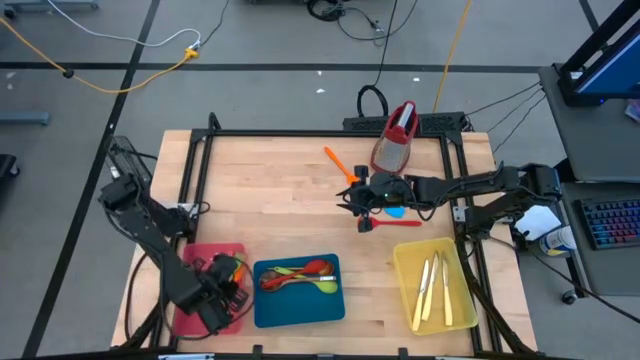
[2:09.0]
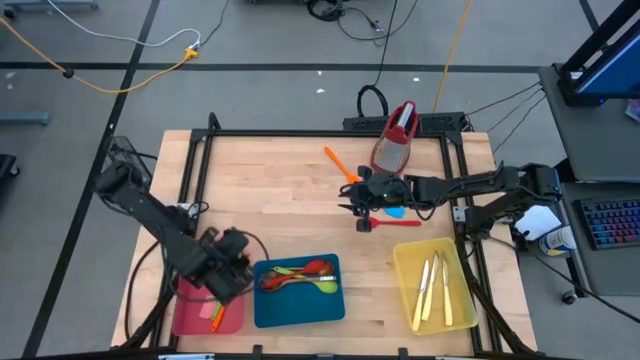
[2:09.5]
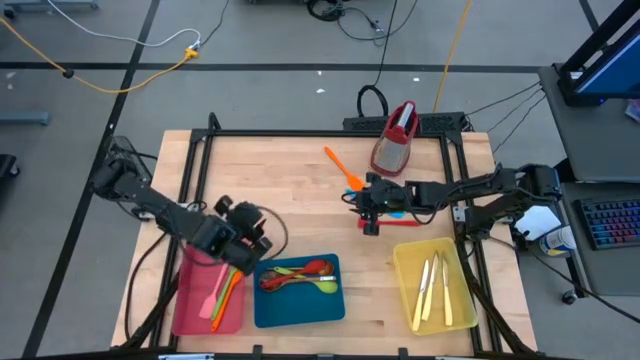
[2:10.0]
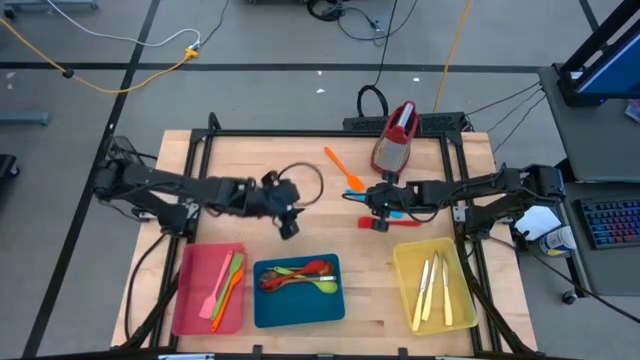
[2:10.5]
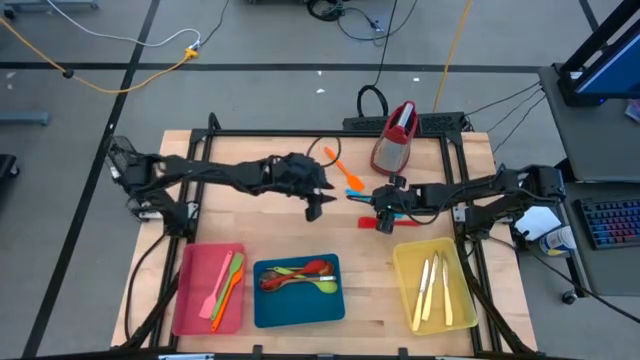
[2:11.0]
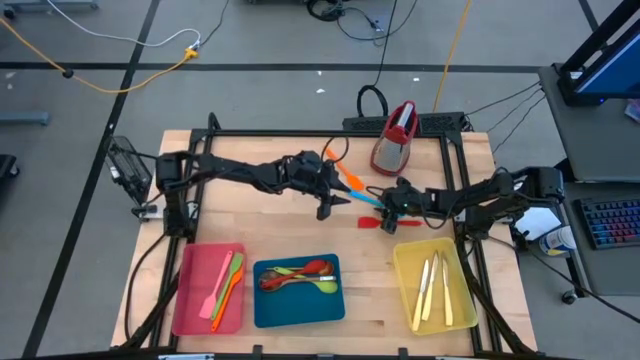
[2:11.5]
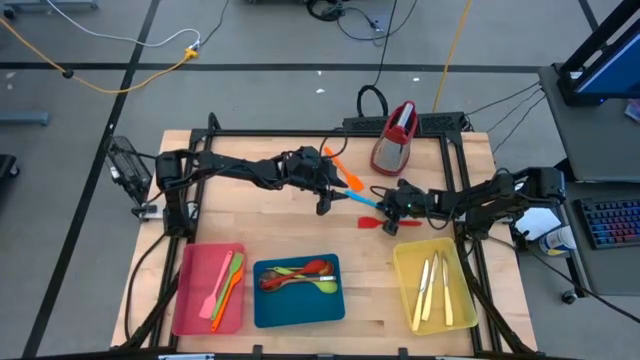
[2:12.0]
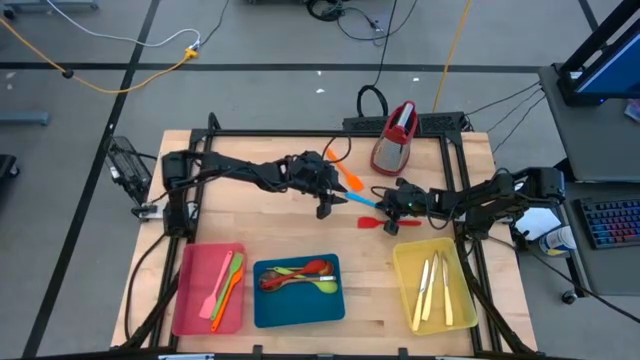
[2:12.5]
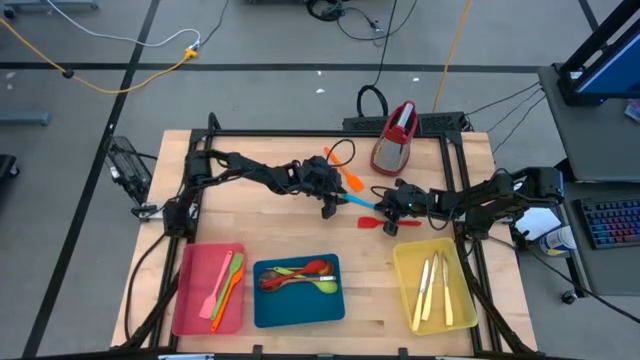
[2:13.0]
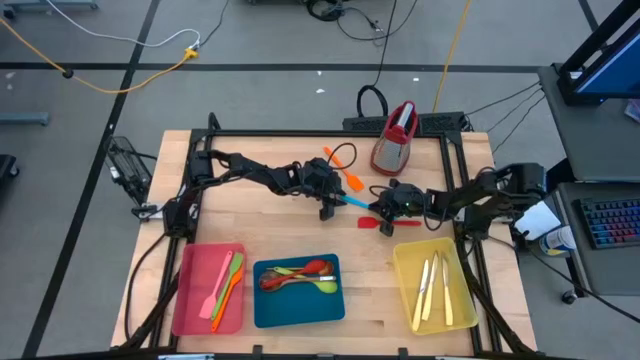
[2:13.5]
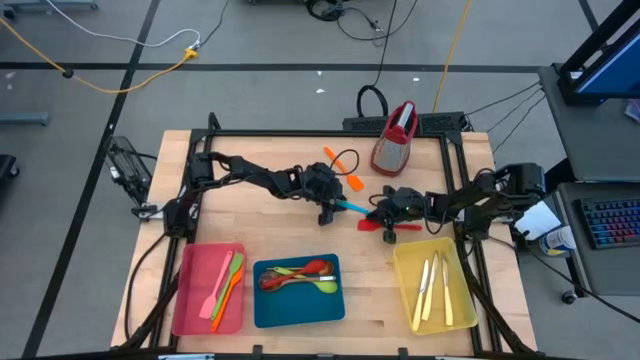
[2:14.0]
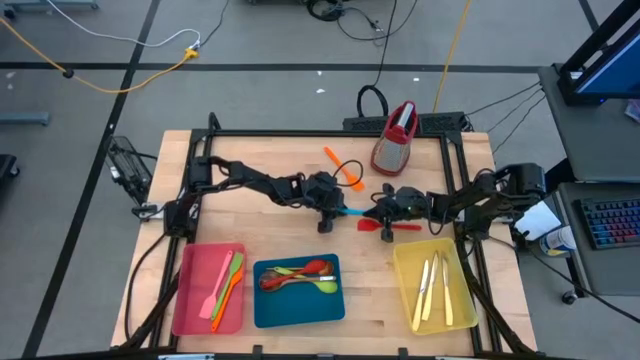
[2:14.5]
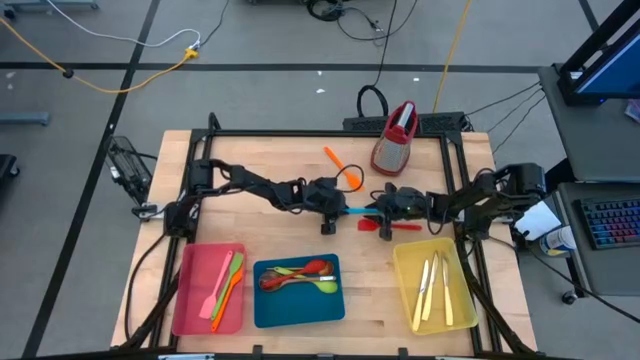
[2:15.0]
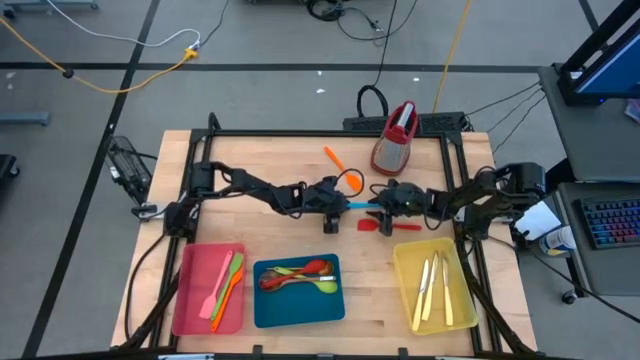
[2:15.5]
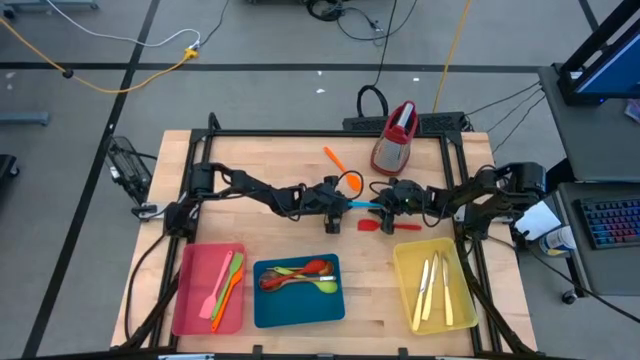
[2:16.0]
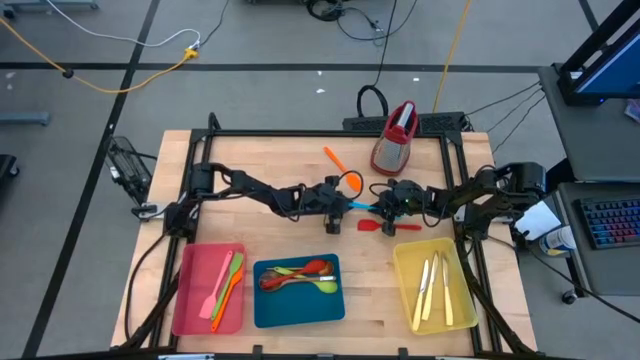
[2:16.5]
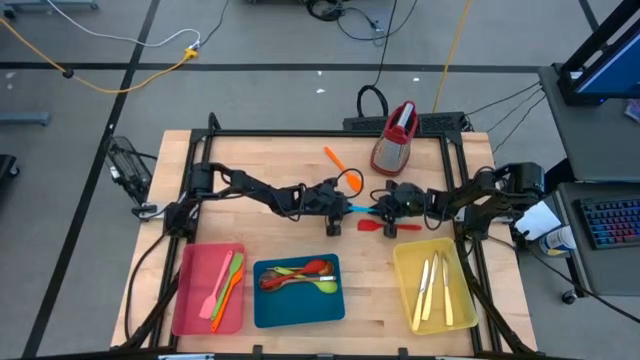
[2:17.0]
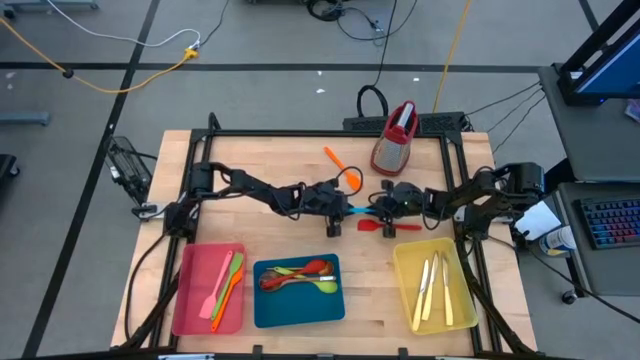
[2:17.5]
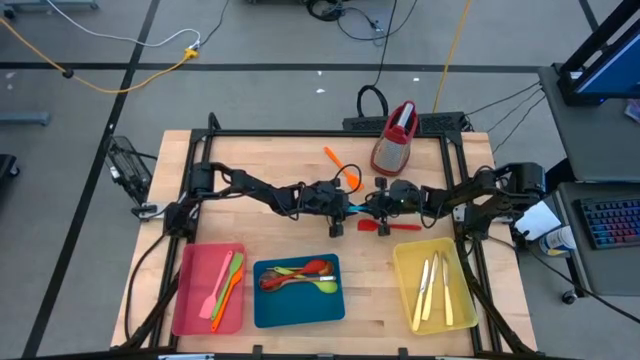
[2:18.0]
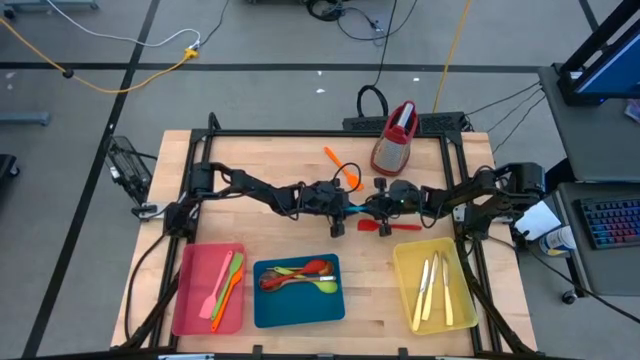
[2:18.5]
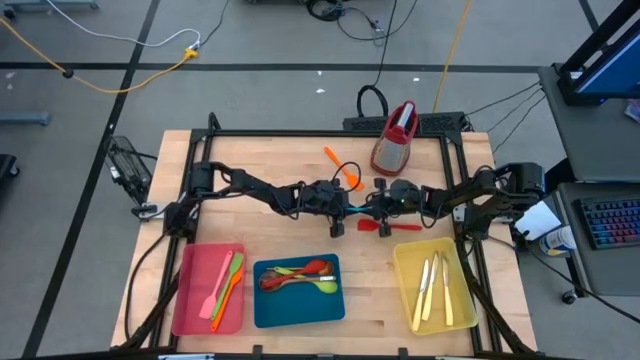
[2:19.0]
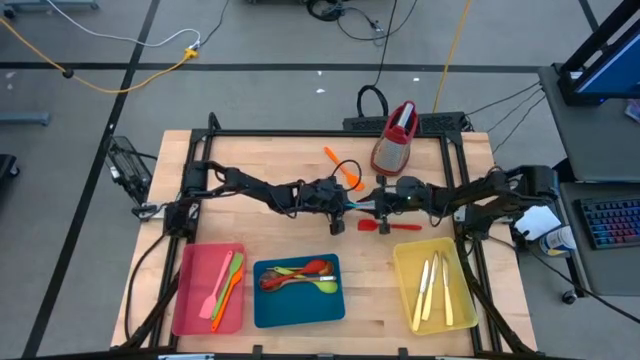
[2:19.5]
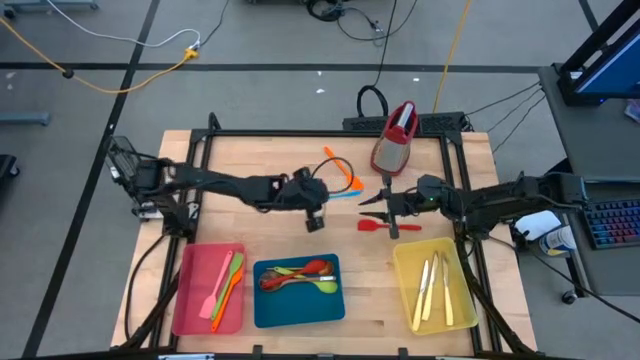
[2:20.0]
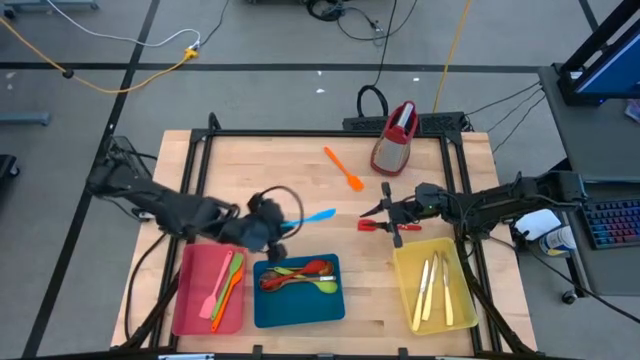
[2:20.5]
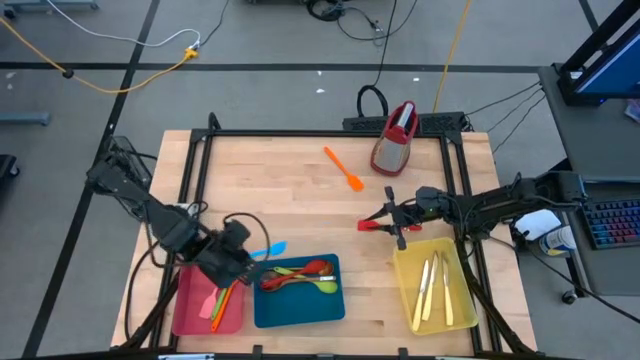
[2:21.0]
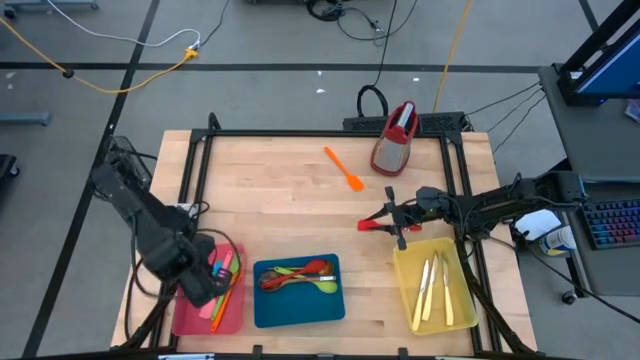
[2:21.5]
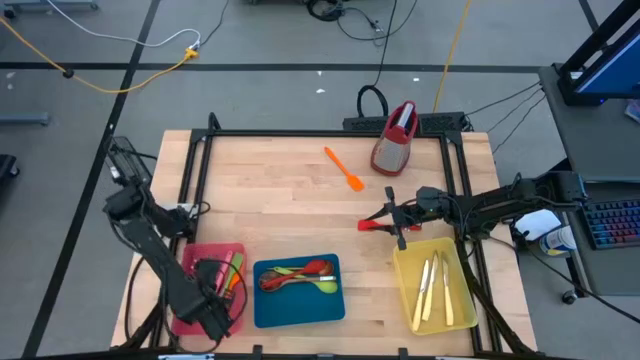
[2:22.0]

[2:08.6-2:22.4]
Task: Pick & Place Kitchen Items
Put the blue spatula into the pink bin

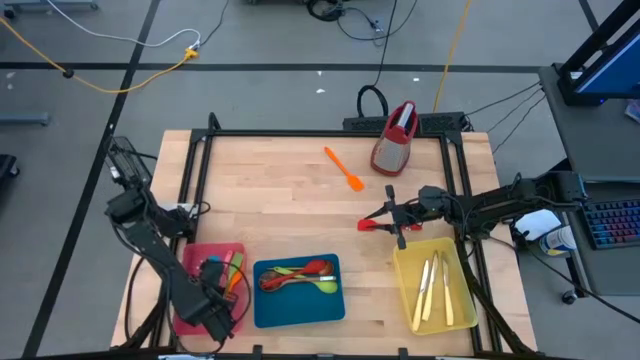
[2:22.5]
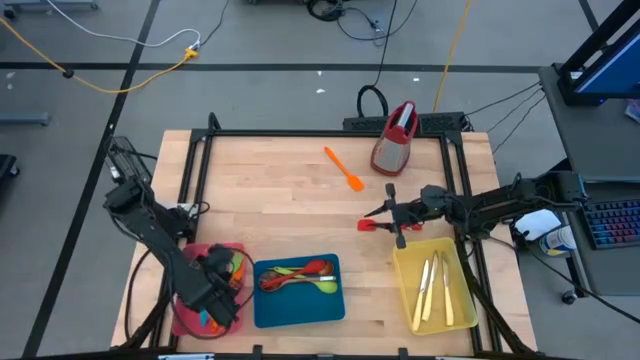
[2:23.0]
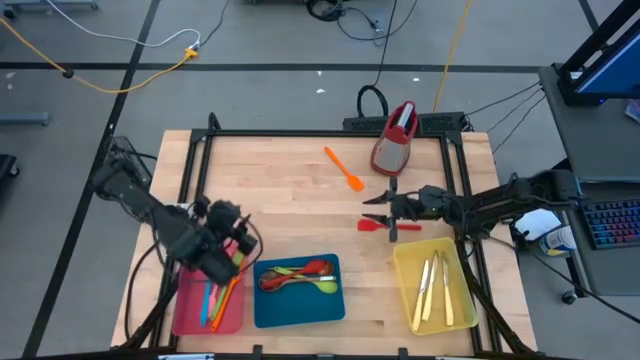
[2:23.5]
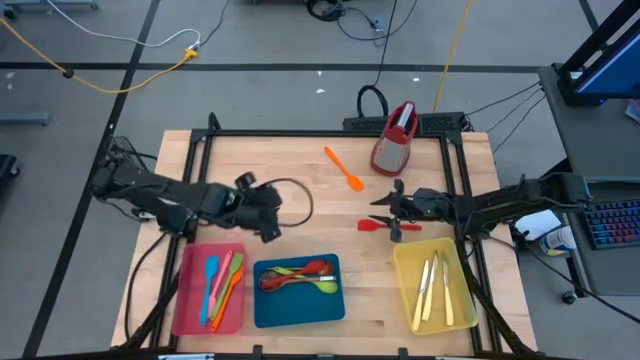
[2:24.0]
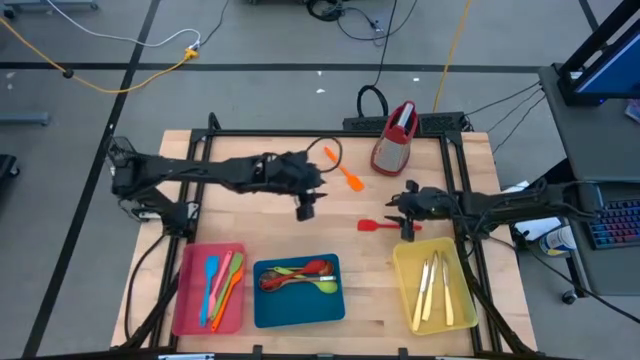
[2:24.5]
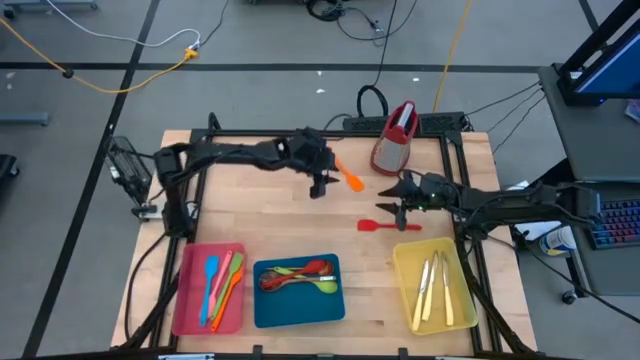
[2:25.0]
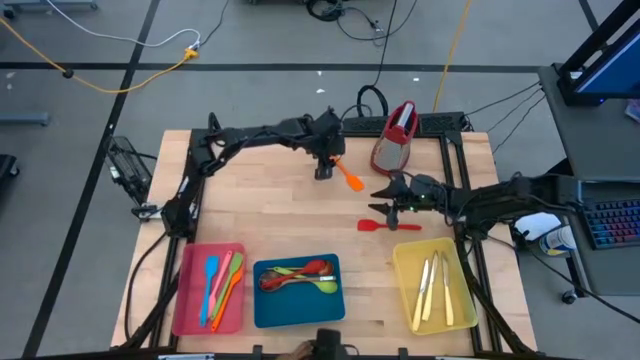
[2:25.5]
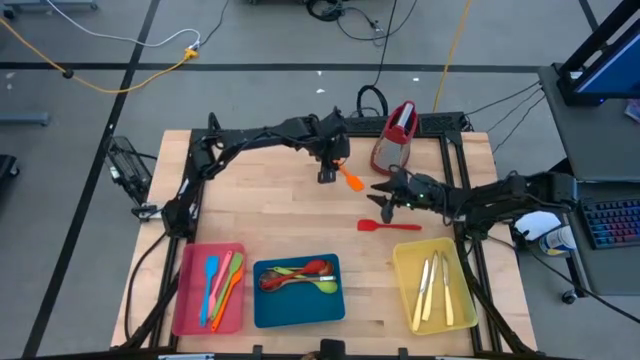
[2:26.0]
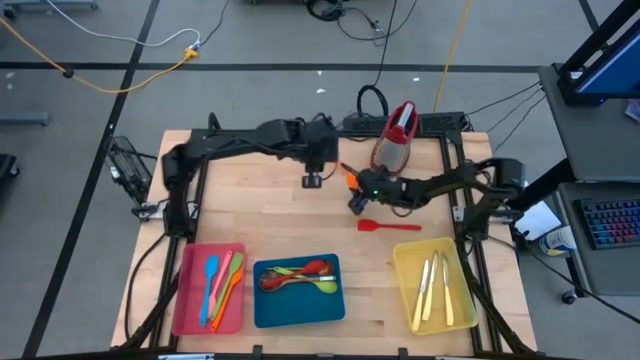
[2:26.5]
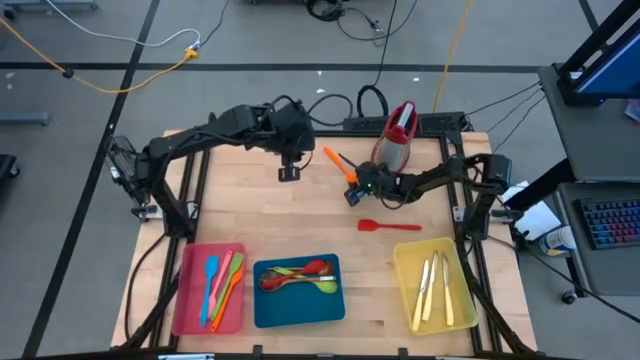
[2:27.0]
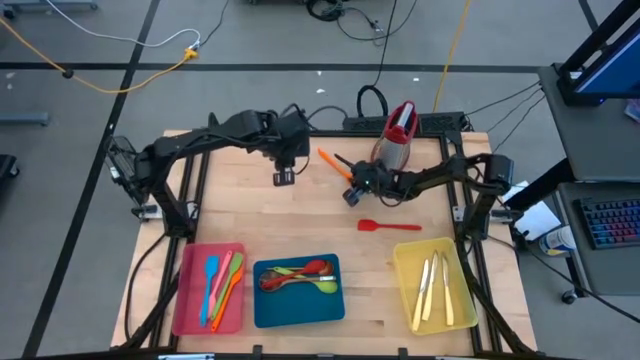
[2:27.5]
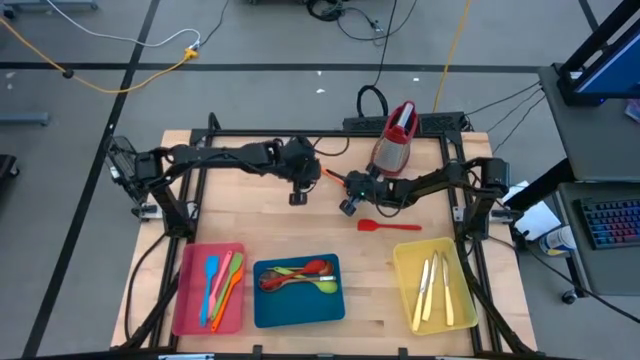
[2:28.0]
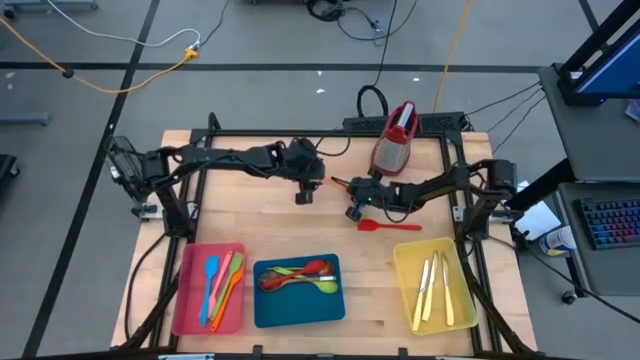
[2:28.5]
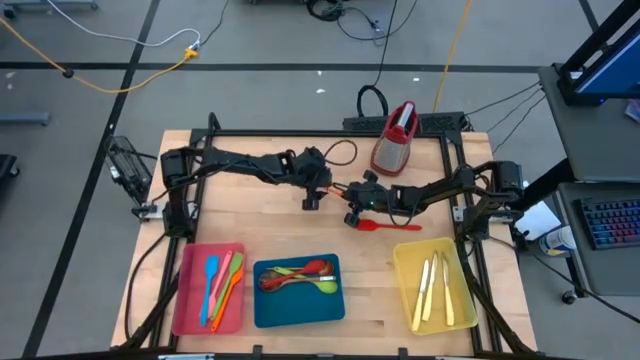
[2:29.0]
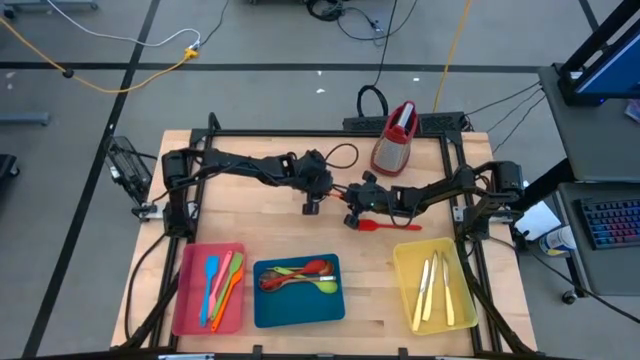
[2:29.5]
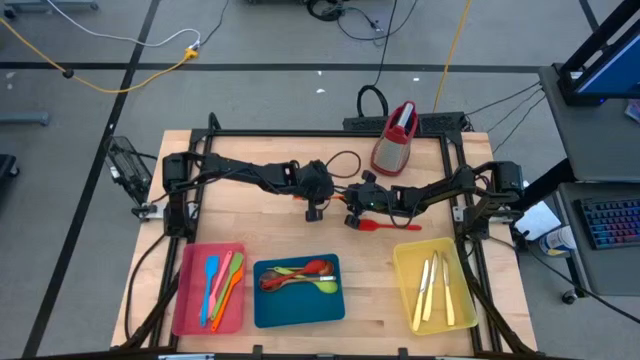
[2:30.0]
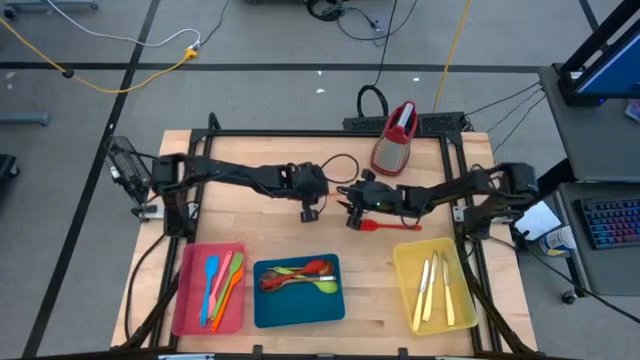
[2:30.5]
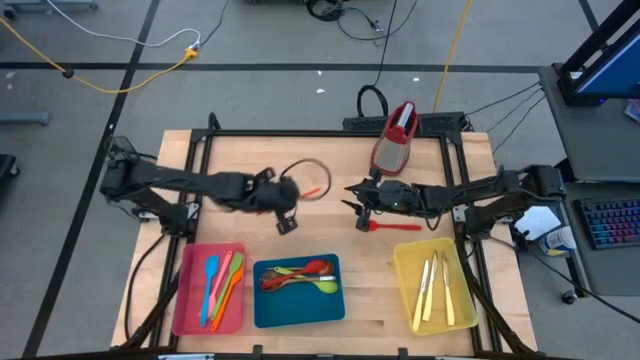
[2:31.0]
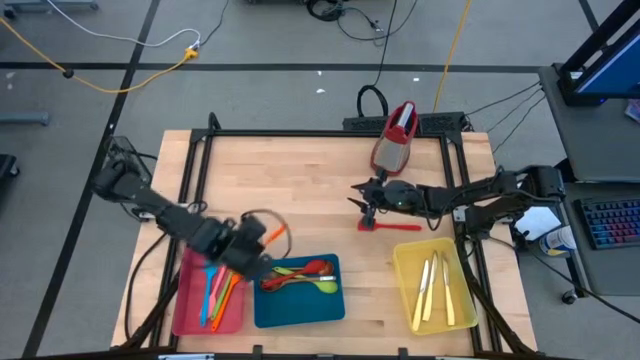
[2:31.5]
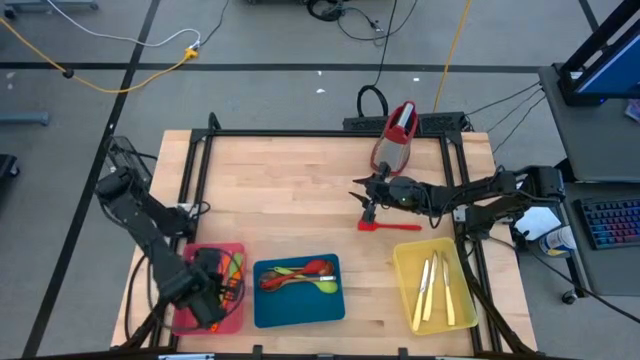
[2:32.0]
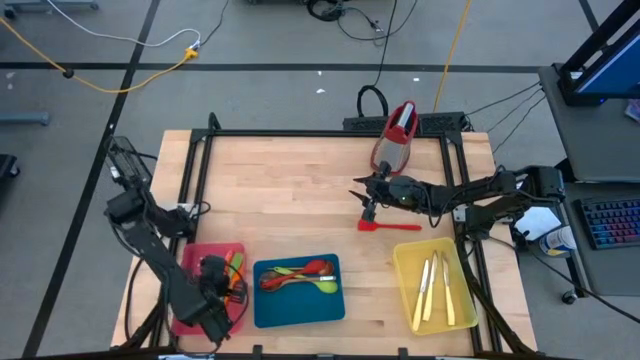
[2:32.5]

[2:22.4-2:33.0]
Put the orange spatula into the pink bin
